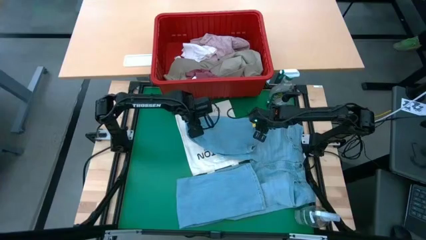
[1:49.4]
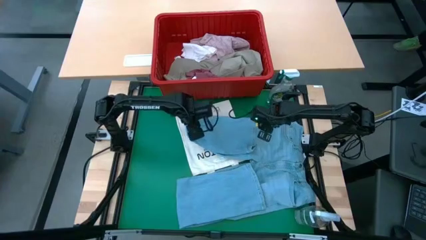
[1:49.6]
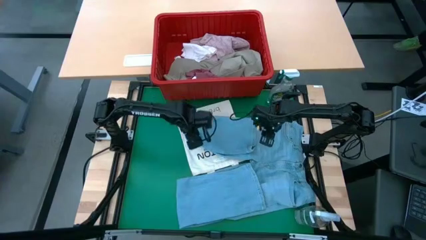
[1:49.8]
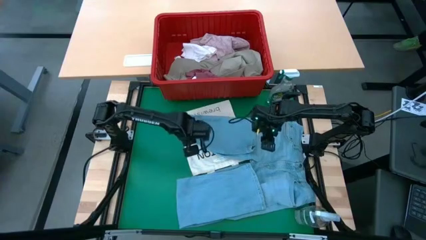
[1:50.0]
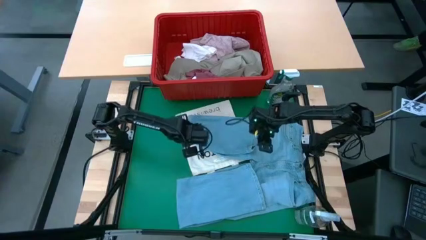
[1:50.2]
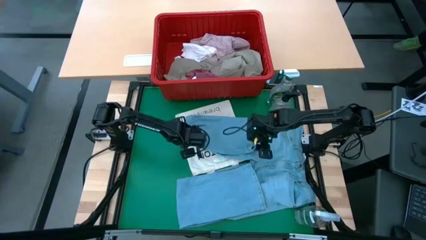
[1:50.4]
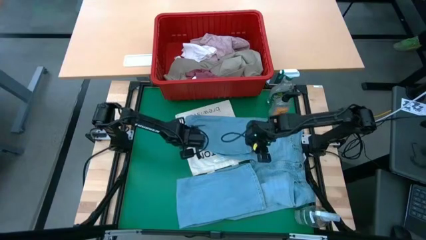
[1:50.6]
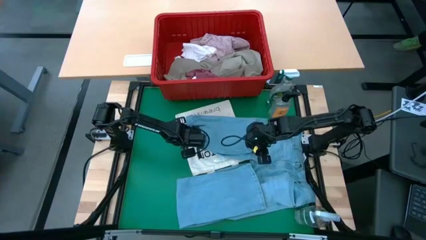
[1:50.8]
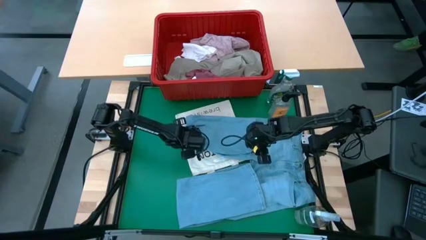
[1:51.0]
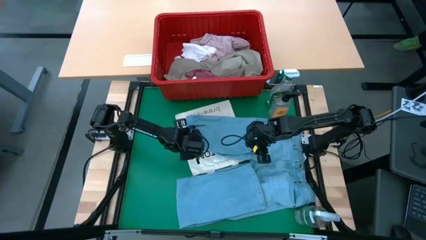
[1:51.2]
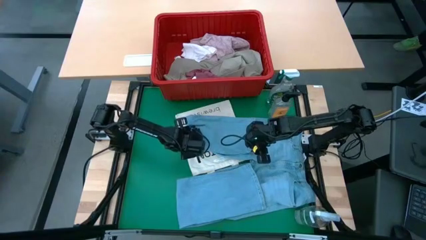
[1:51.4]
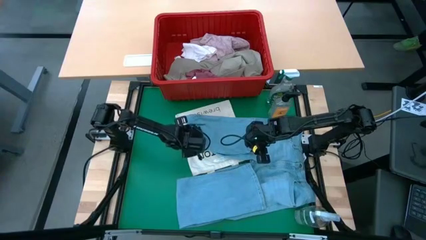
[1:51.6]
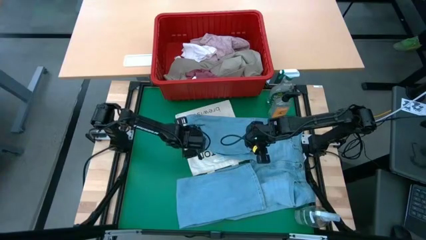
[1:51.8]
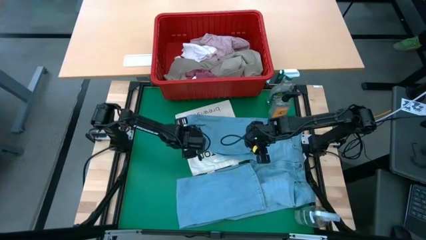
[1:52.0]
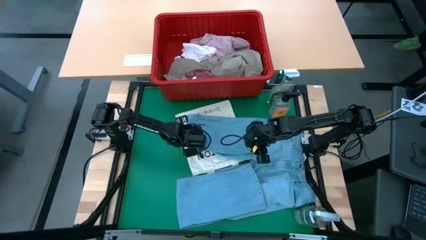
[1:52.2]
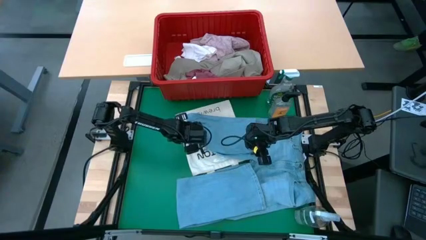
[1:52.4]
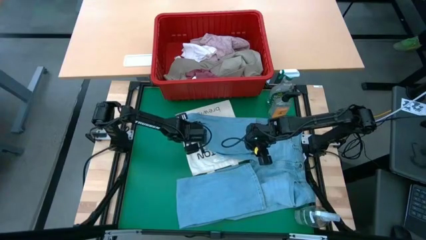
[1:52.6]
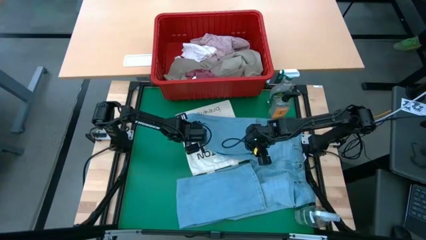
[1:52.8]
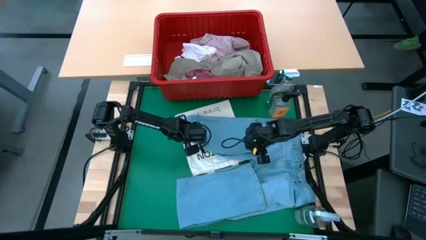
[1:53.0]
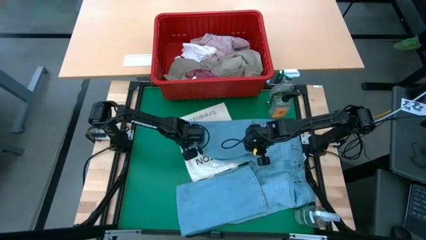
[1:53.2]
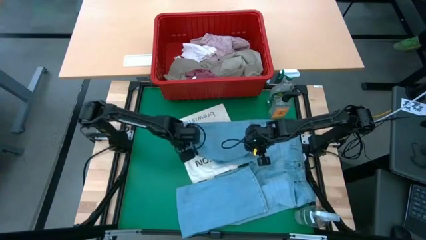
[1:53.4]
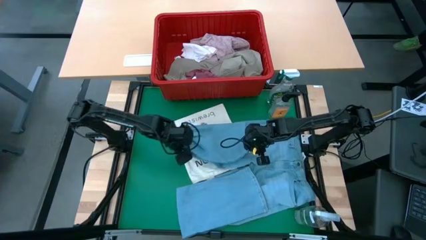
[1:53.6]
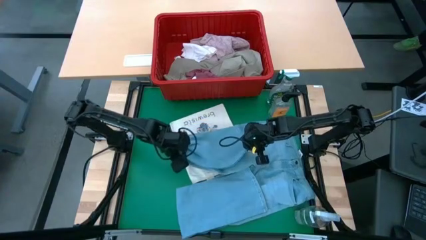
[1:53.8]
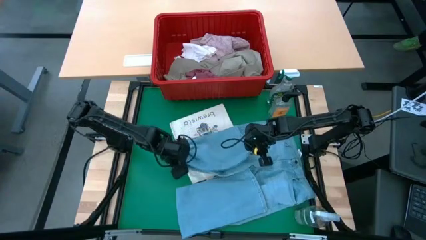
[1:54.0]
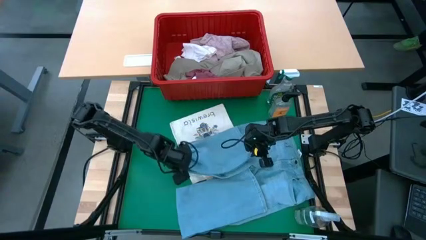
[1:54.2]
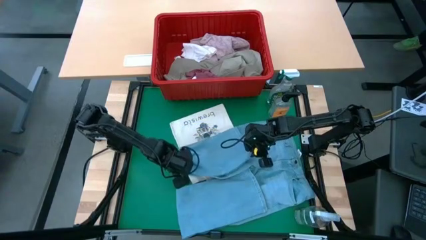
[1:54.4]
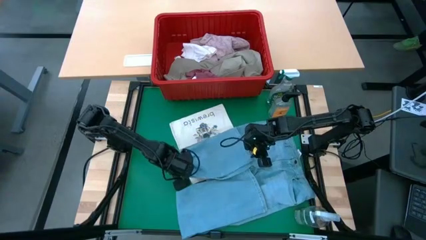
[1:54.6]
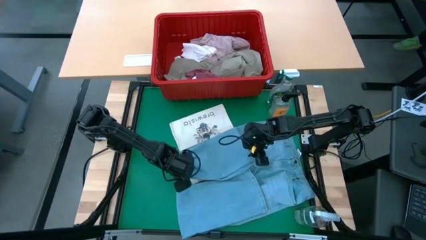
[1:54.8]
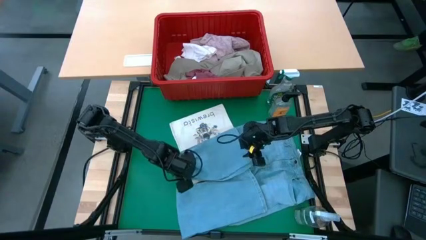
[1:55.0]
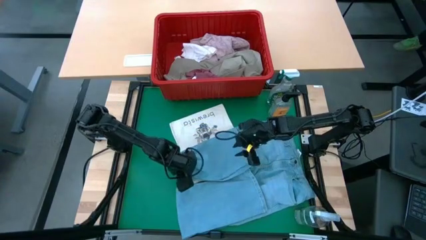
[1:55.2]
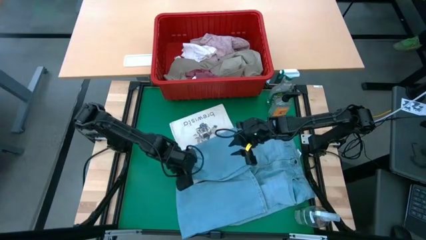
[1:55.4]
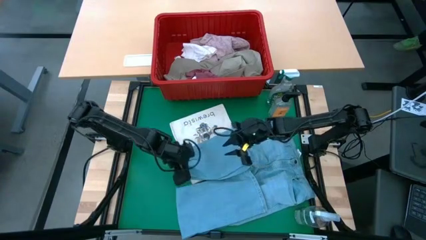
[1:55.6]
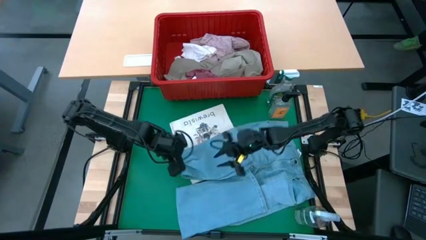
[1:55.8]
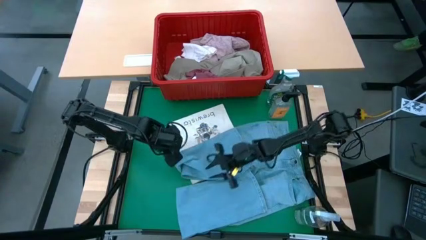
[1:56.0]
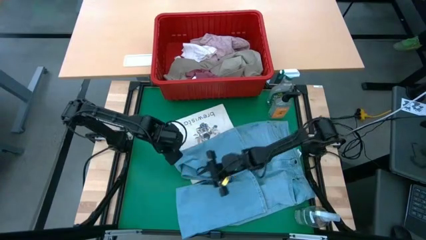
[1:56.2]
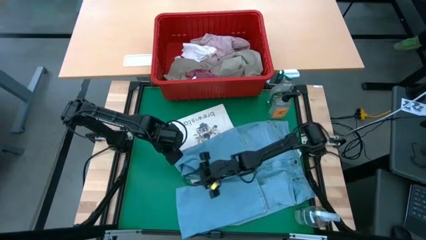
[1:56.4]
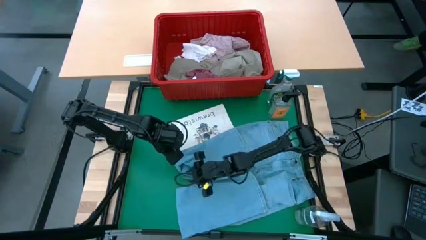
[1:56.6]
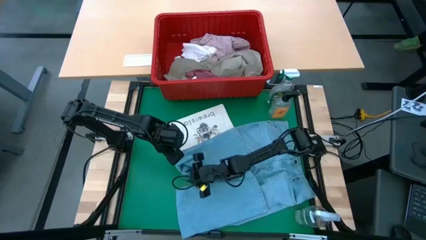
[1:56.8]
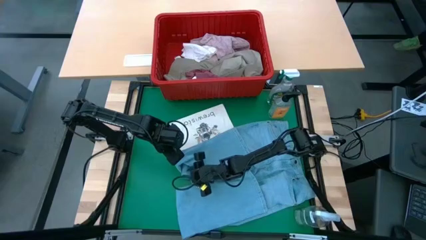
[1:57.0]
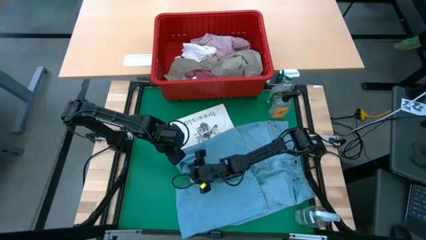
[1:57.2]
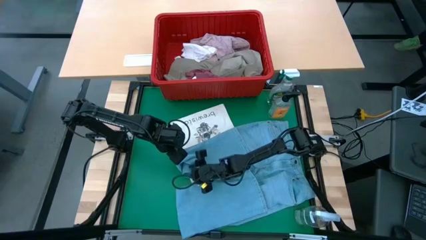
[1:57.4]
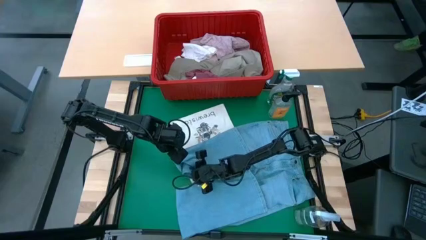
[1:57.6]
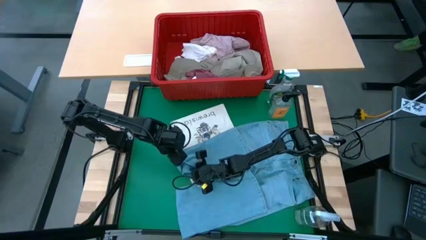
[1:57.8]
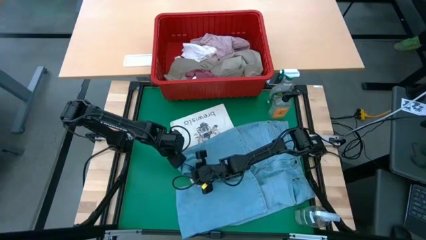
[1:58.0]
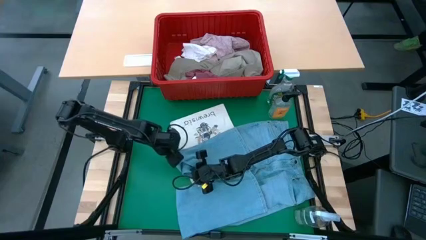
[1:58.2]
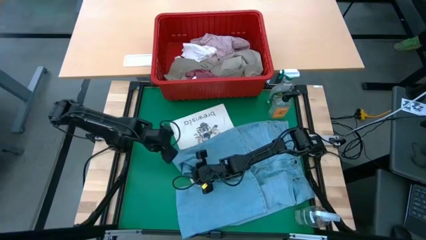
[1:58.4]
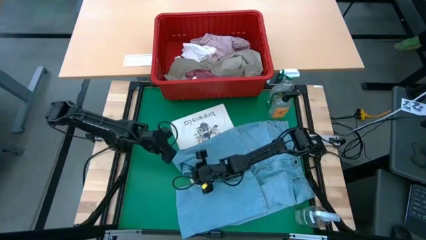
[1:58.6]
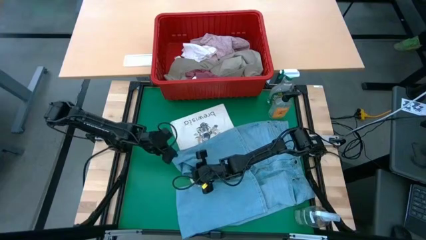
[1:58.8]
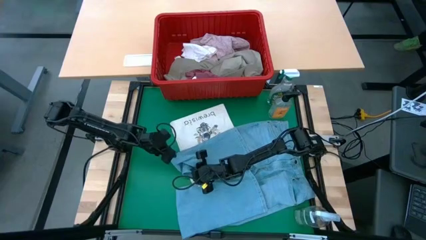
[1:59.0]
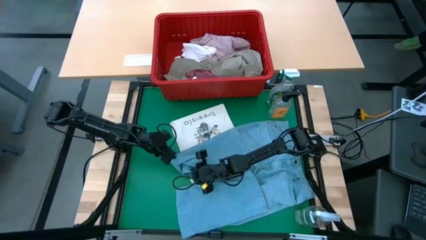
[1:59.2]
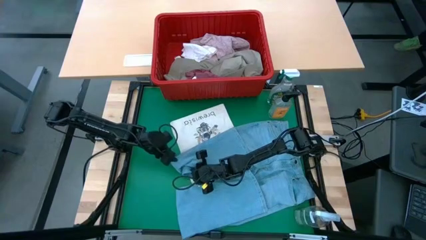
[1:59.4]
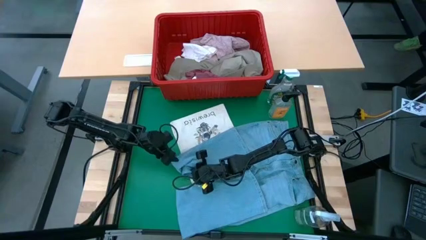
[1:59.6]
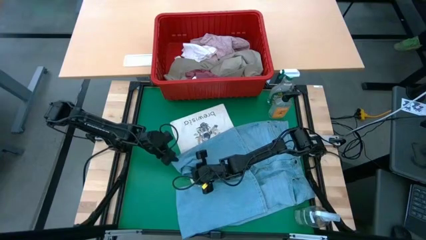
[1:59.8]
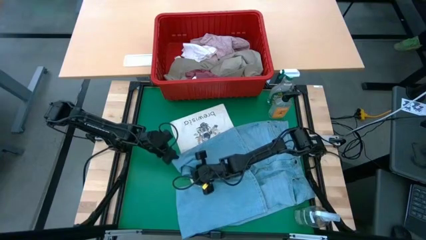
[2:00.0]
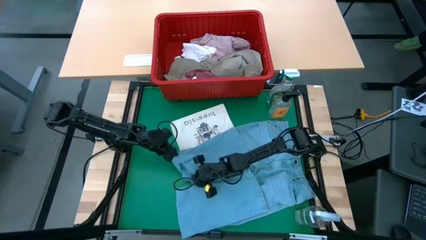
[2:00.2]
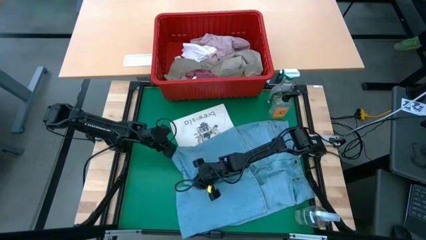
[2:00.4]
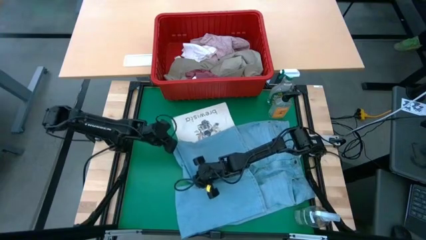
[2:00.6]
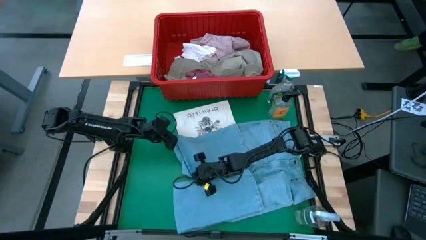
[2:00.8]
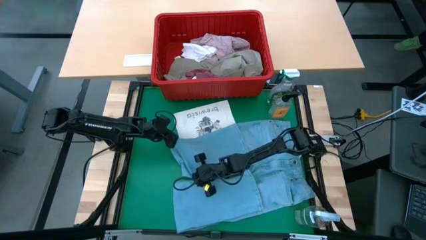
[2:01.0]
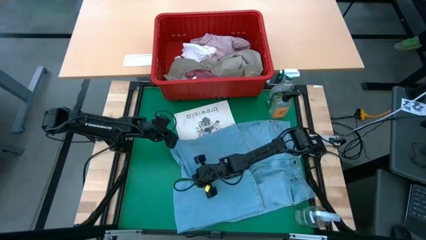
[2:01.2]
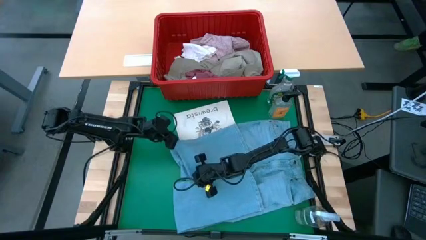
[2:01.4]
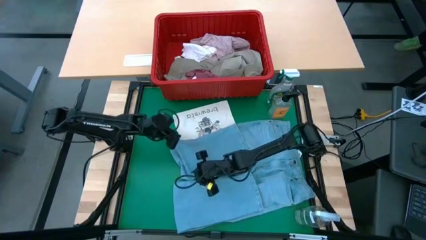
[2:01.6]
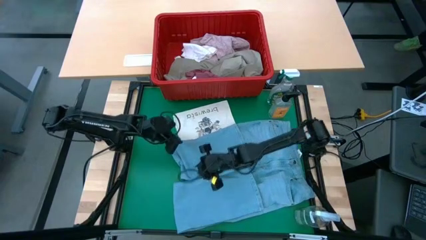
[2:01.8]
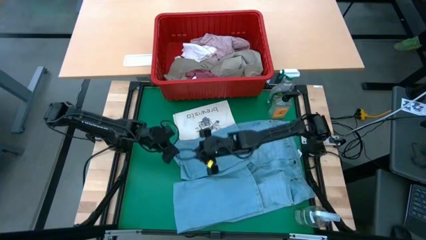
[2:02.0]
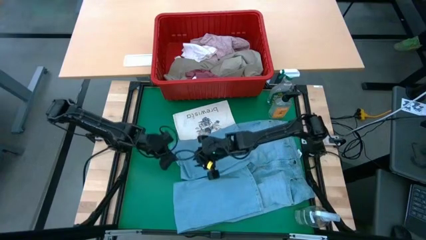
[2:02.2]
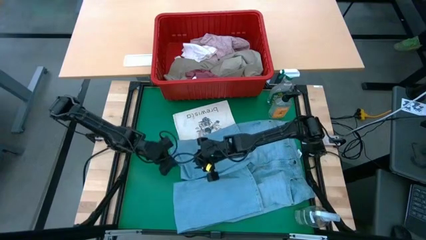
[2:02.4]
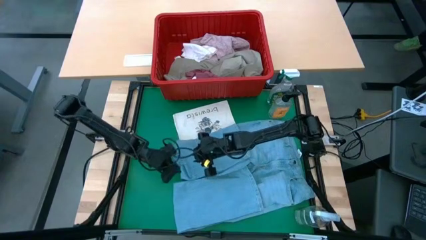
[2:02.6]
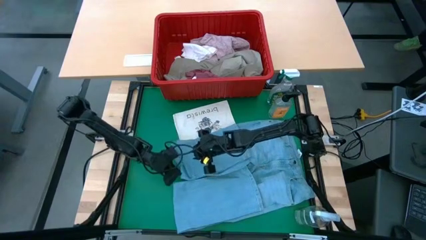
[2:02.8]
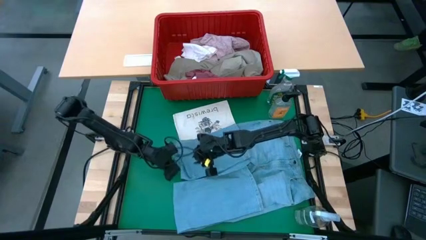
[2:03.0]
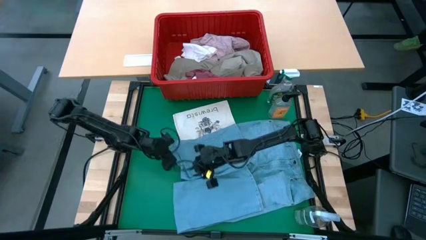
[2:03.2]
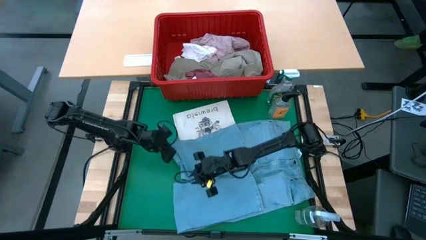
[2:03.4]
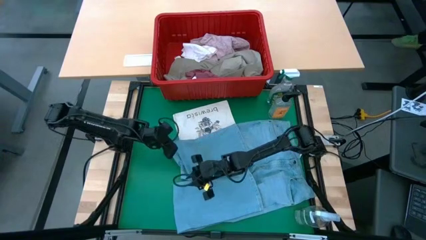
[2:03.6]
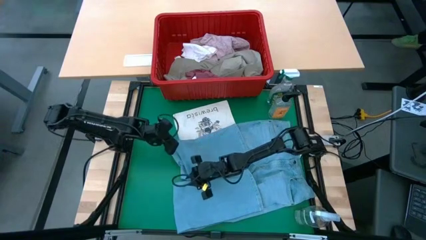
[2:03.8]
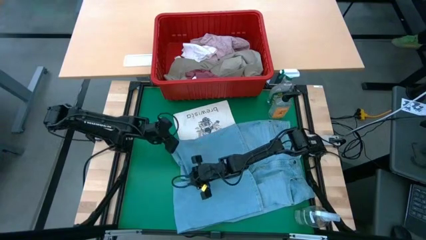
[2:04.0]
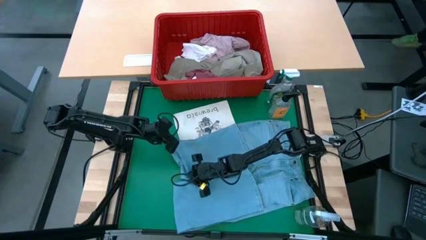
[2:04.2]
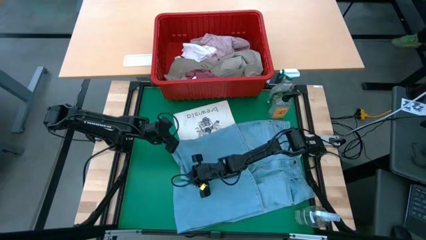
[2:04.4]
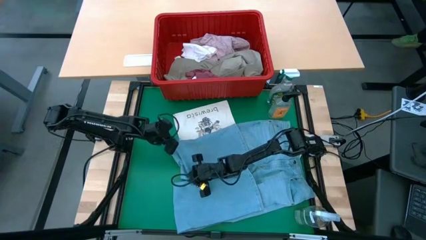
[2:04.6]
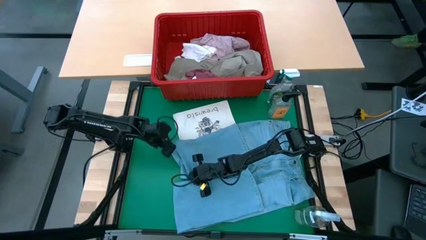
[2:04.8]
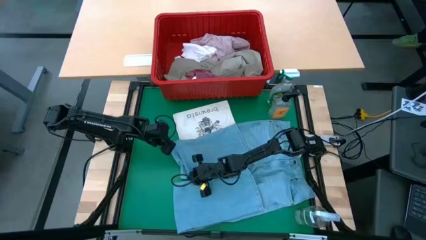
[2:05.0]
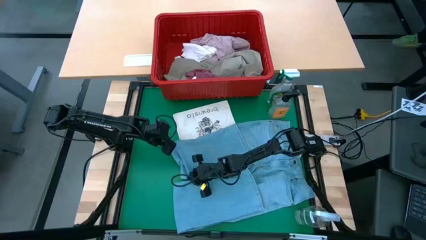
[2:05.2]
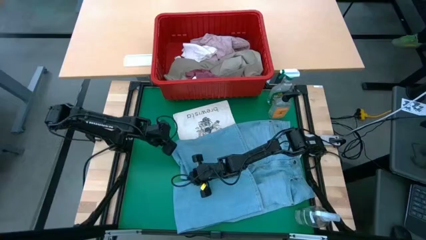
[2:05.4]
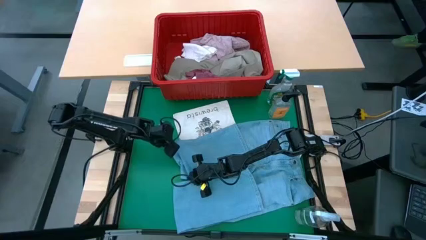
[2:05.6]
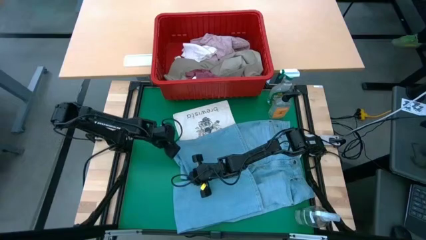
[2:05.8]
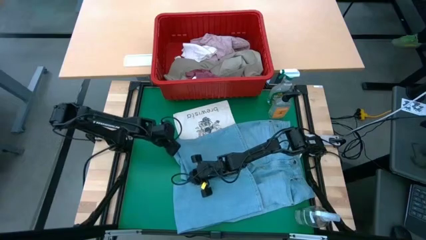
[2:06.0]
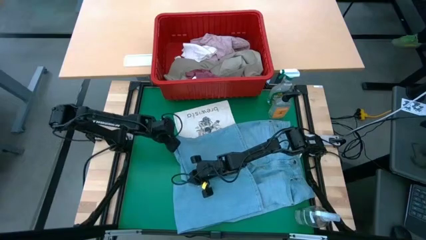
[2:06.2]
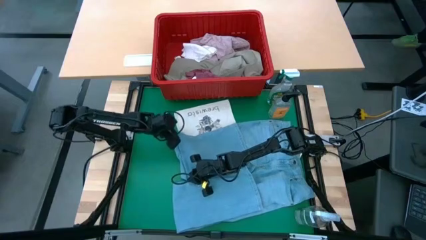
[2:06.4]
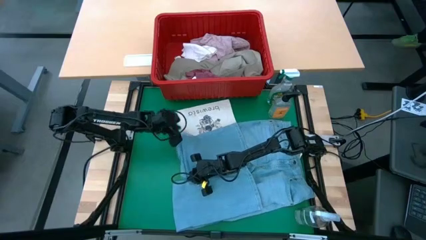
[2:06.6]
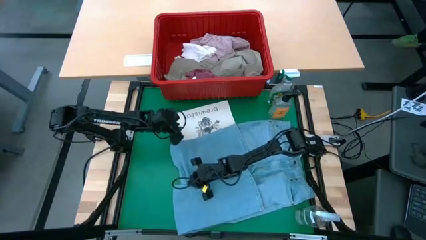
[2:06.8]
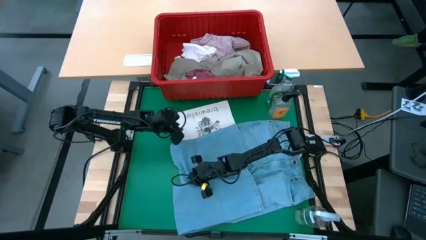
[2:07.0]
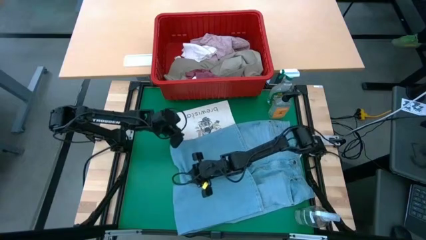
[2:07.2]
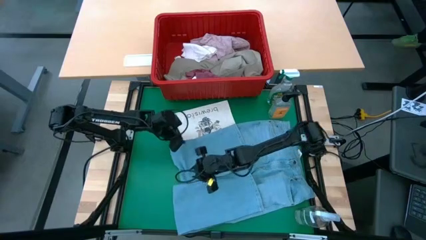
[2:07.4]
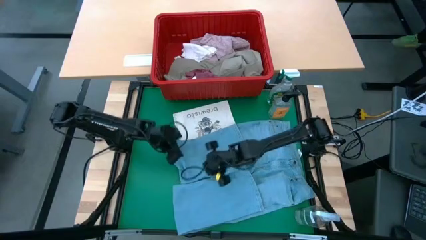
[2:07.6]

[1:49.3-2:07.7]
Task: Fold laundry
Fold the light blue pants
